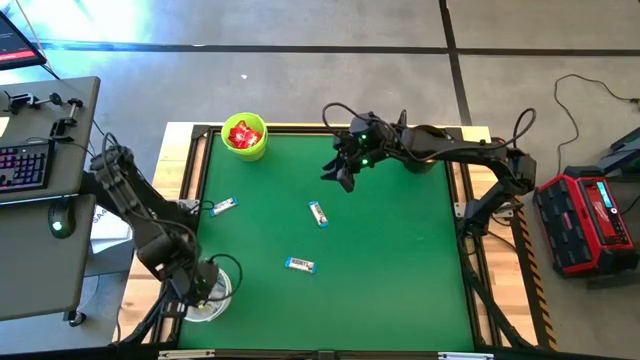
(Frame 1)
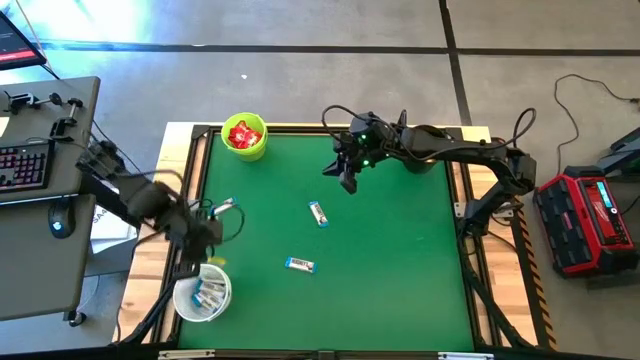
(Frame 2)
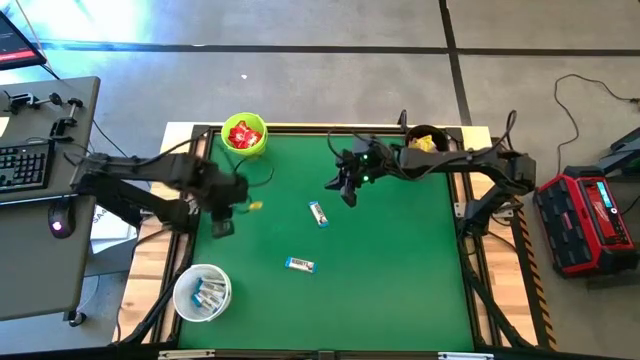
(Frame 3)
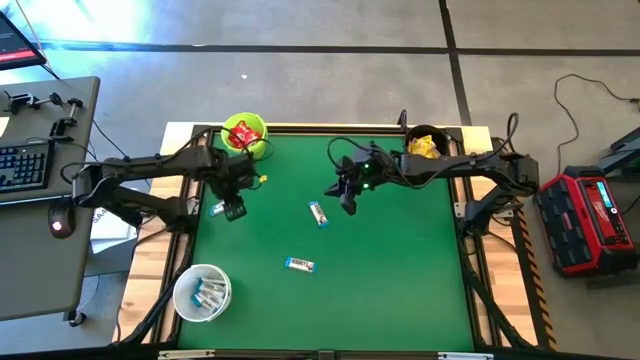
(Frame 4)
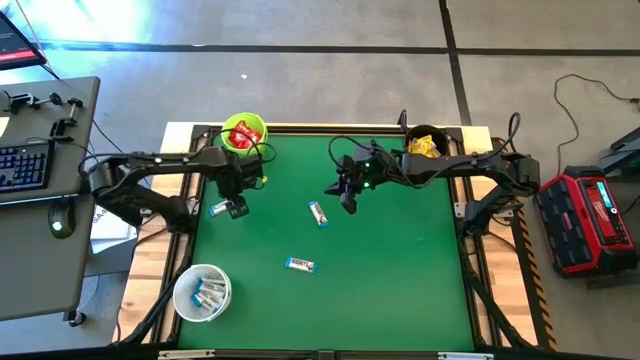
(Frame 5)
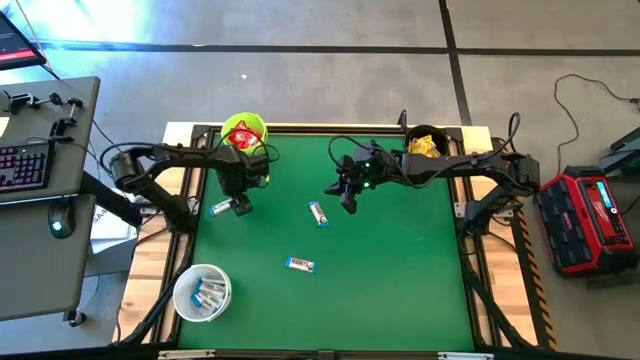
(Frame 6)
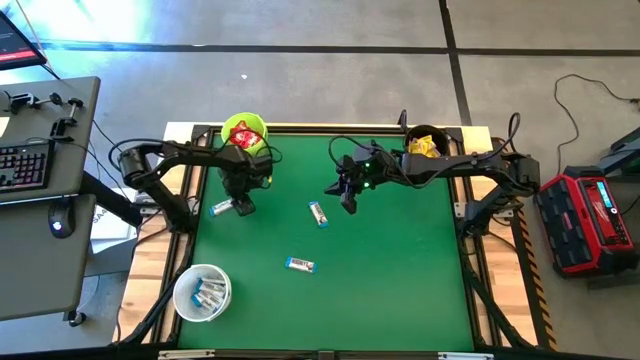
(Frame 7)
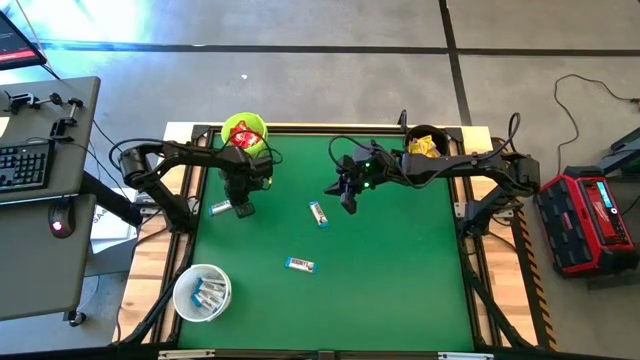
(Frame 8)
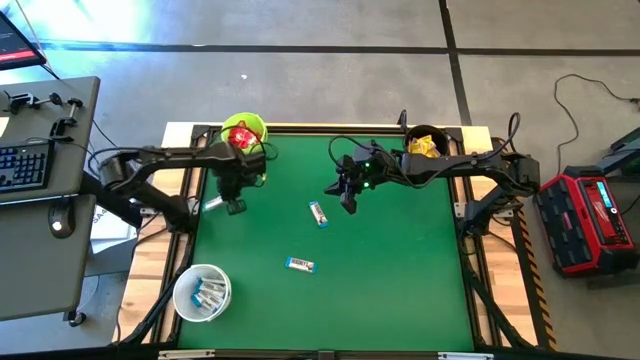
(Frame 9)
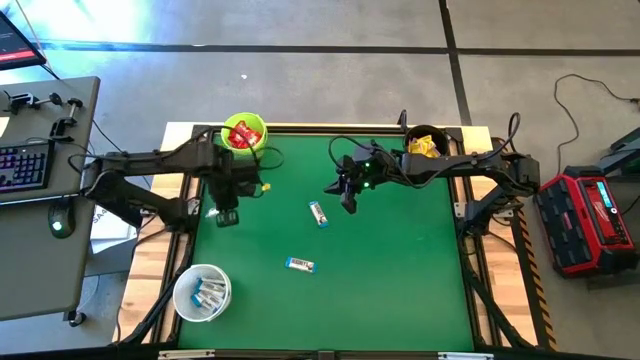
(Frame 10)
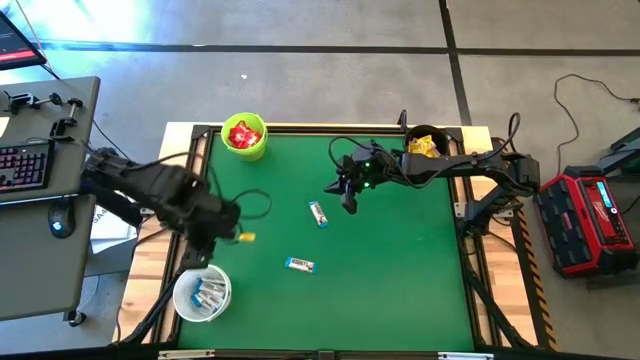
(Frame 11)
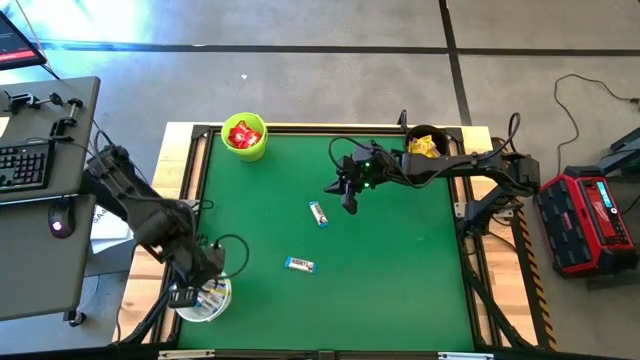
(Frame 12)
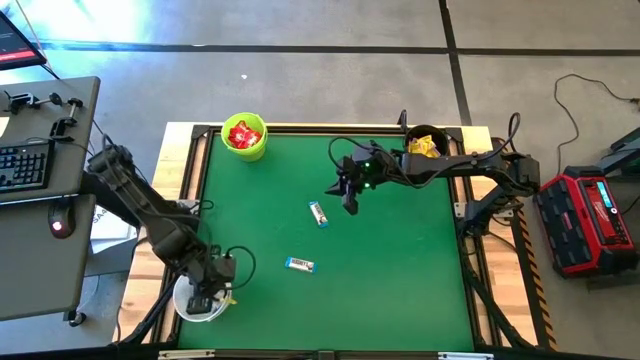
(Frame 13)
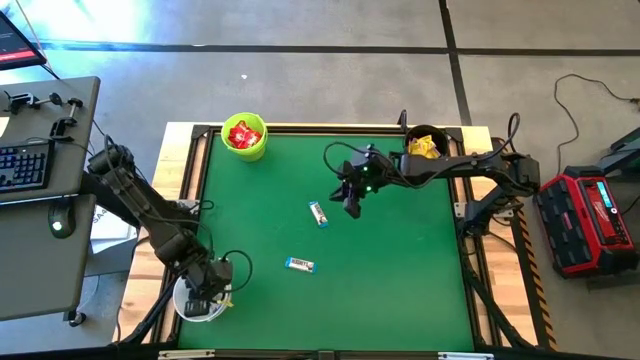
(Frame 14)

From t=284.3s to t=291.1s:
Task: Sort candy by brand, put in halloween buckets
Put the white chocolate into the white bucket

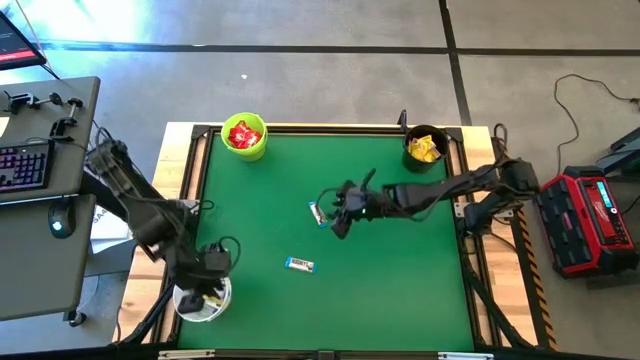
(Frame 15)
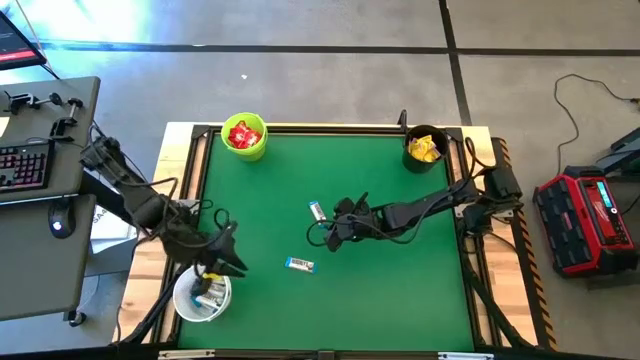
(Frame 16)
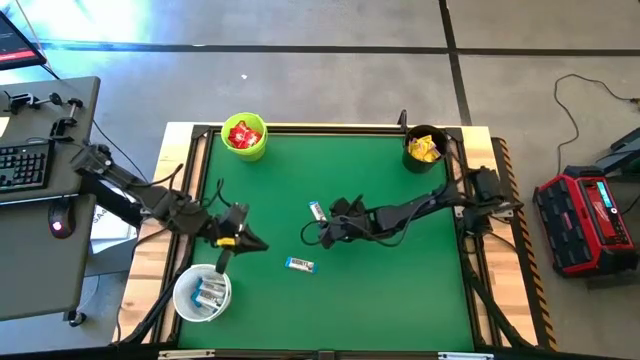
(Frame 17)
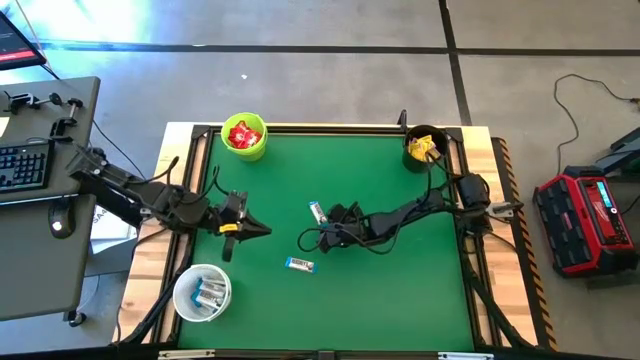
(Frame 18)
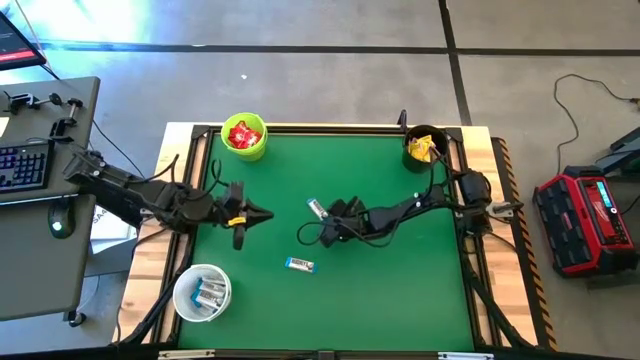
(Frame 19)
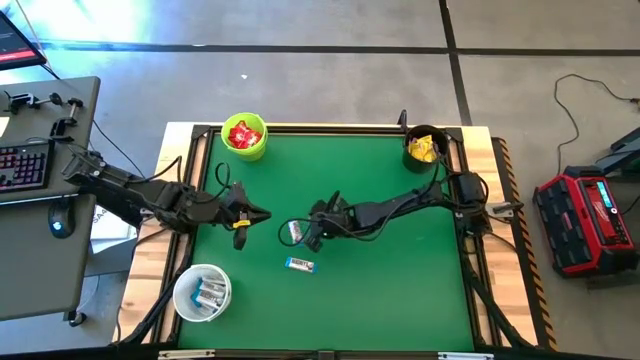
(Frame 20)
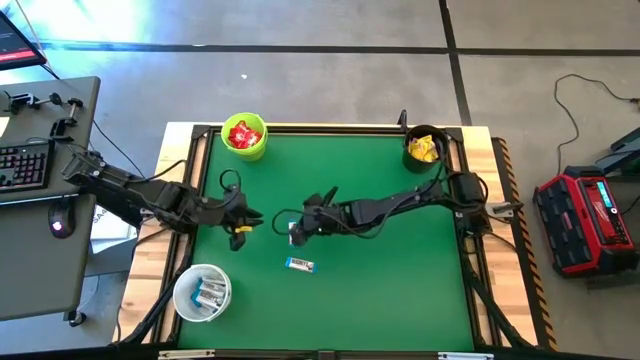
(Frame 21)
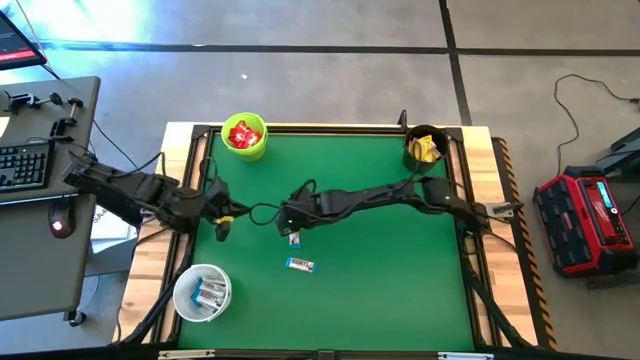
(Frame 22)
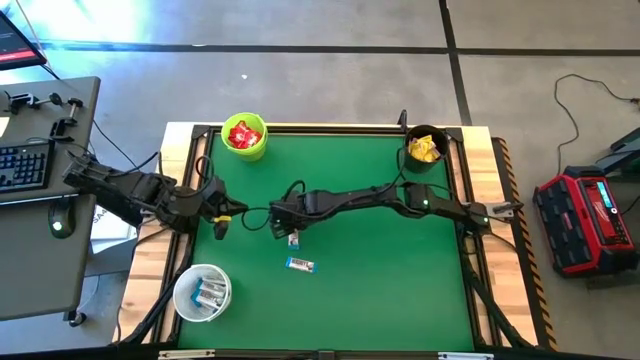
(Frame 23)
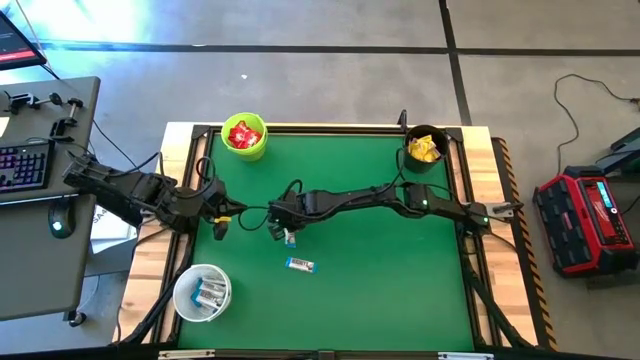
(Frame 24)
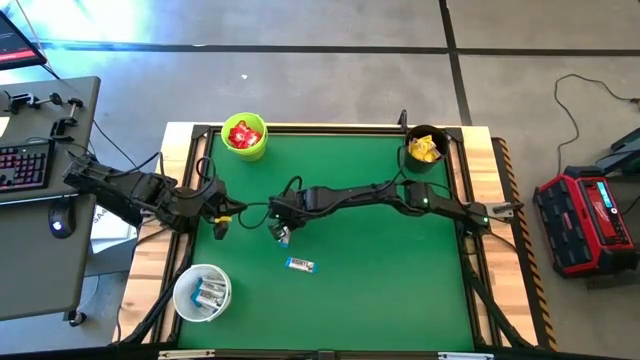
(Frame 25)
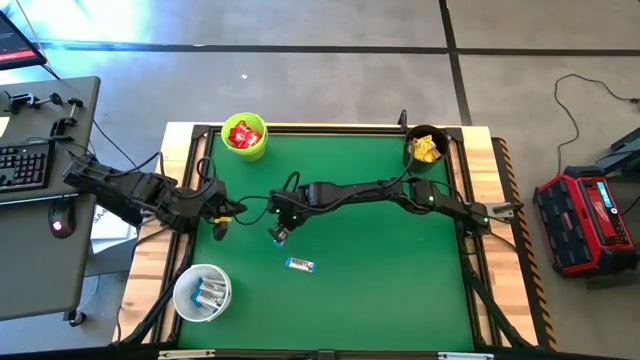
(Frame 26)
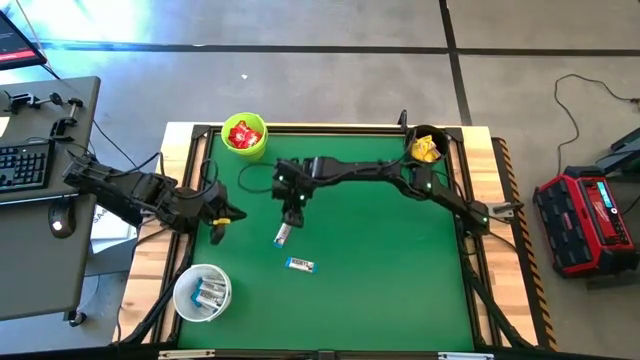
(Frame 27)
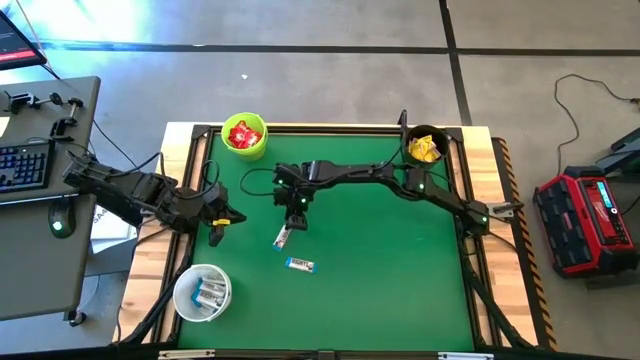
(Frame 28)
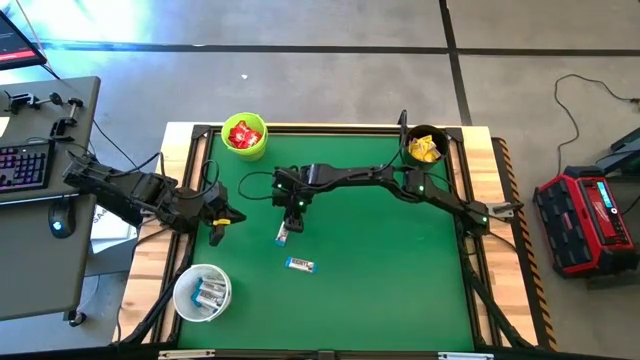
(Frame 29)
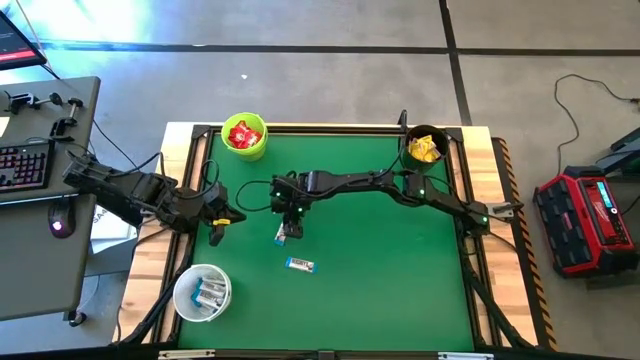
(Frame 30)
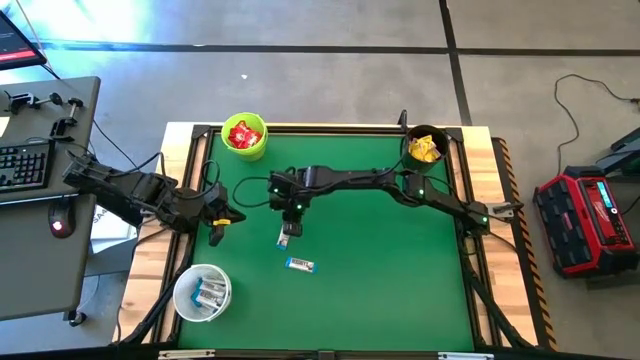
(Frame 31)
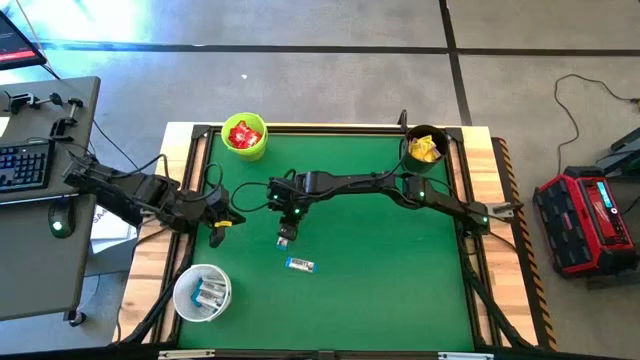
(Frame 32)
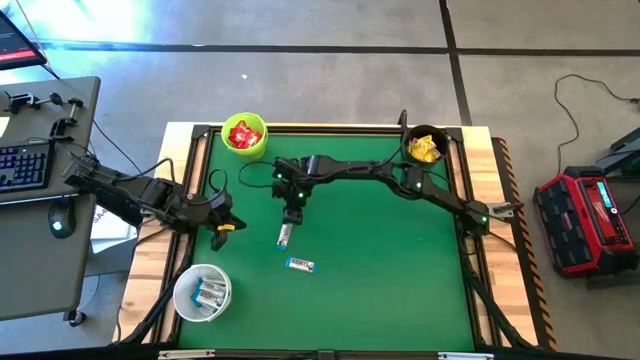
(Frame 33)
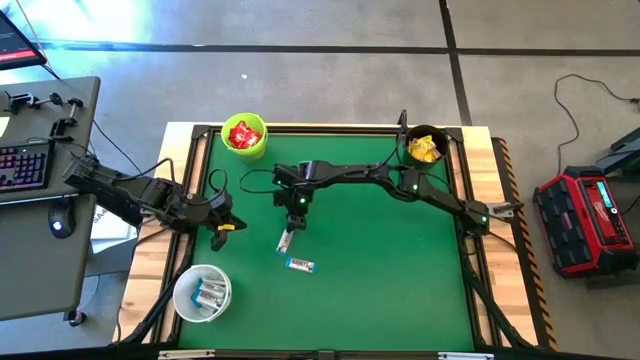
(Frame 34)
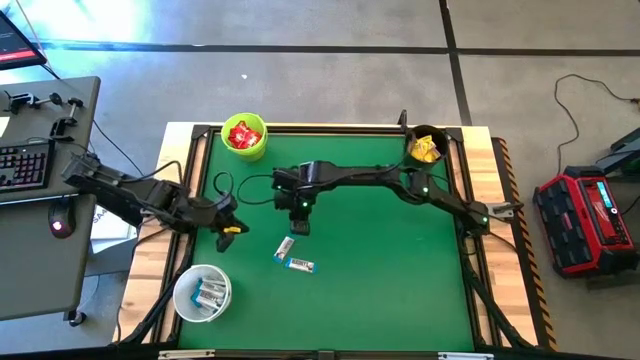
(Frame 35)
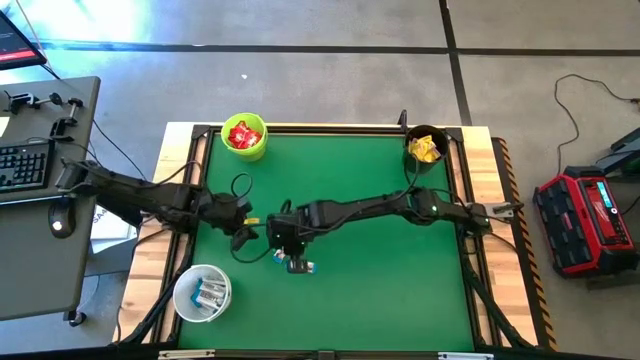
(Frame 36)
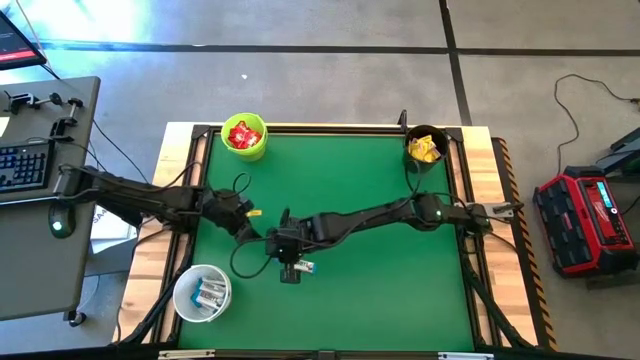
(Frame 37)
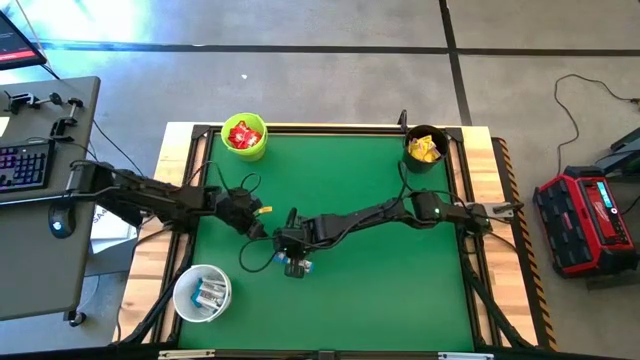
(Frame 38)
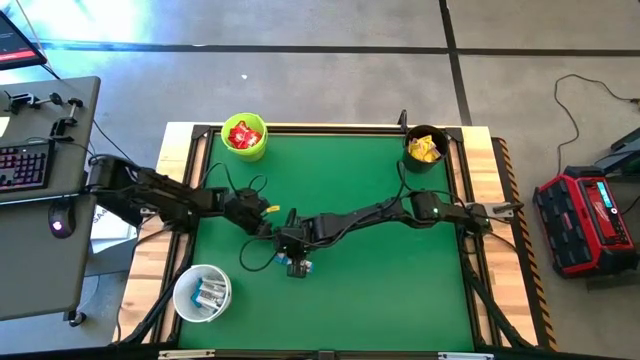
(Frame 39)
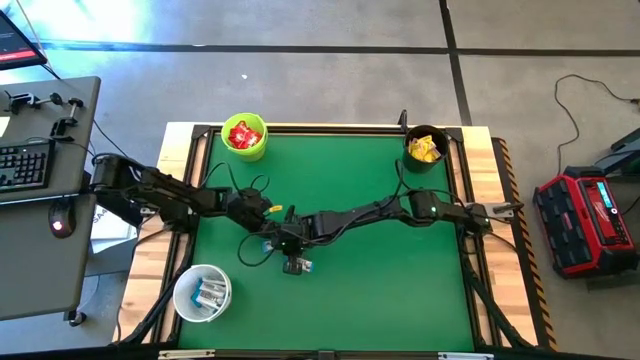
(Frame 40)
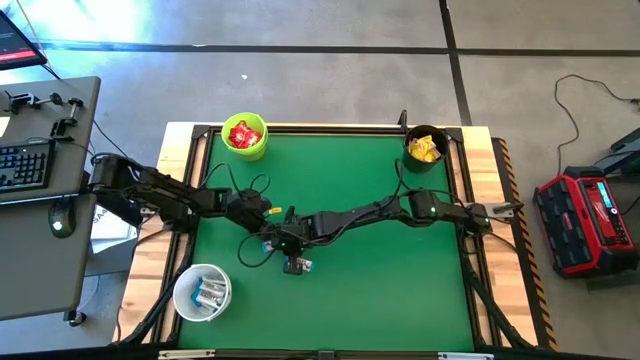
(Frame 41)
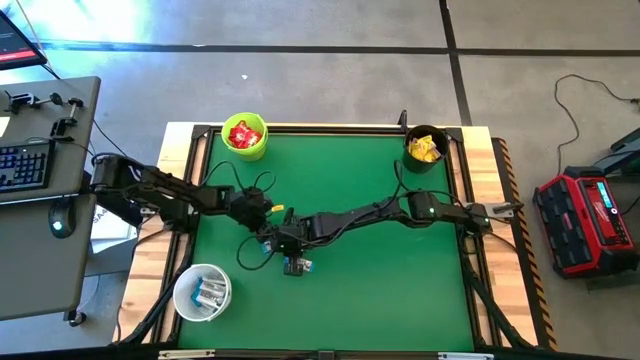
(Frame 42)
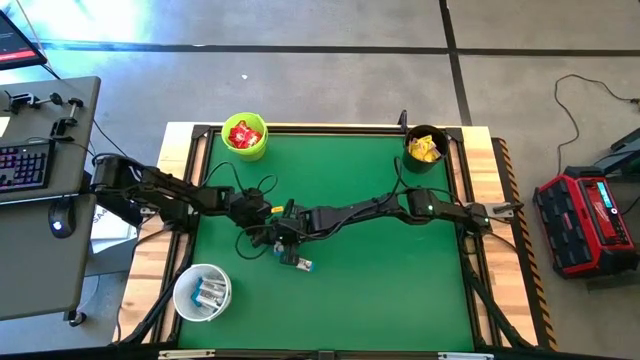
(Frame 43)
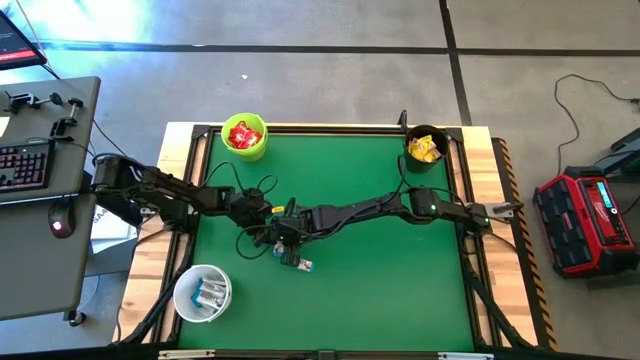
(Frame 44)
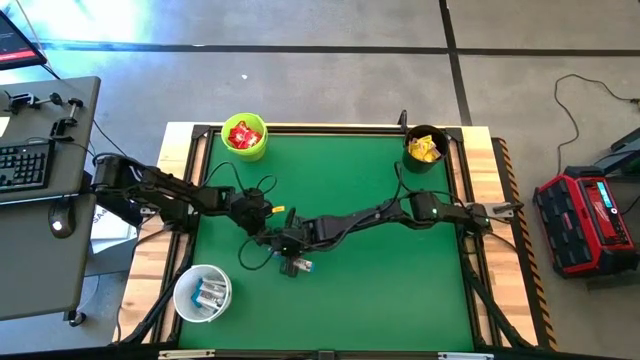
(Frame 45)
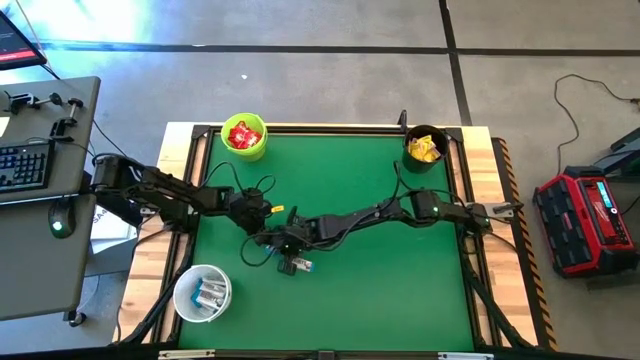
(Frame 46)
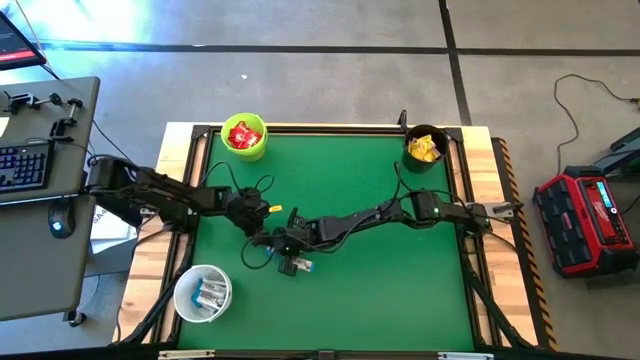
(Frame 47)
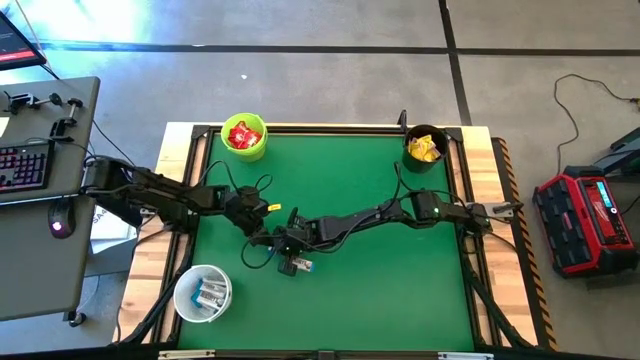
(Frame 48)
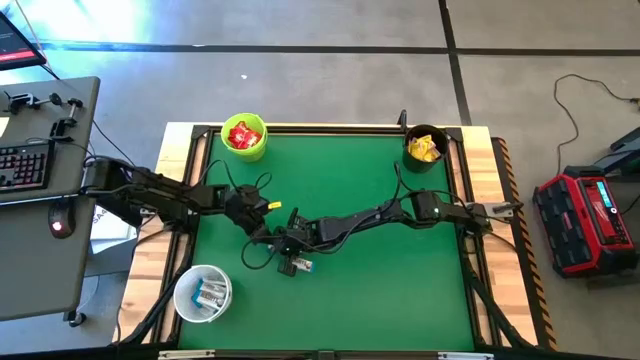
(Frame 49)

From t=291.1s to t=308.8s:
Put the white chocolate into the white bucket
